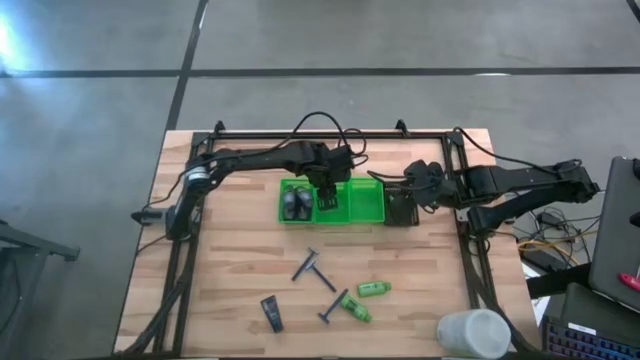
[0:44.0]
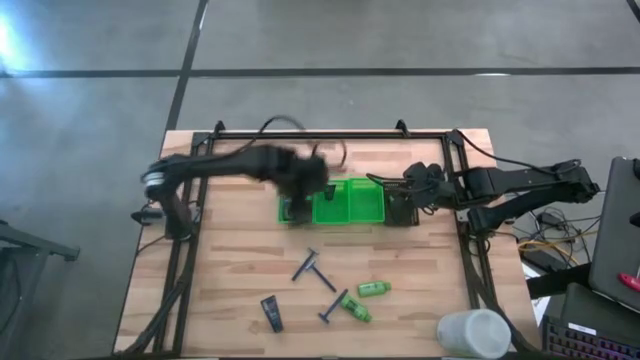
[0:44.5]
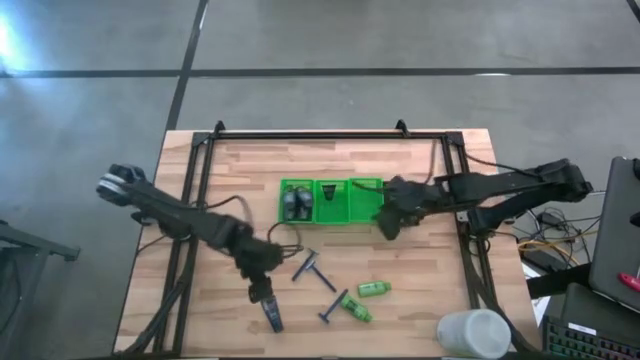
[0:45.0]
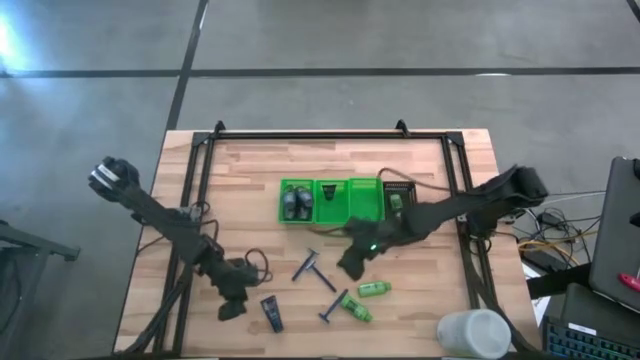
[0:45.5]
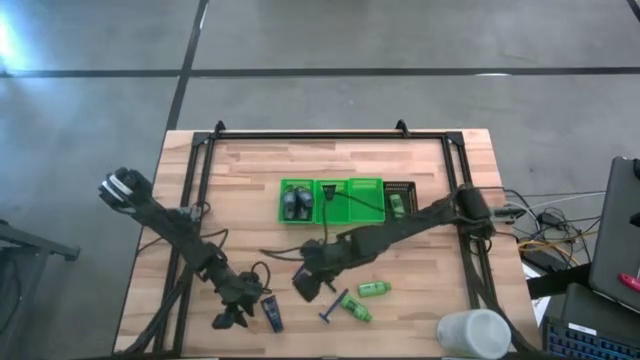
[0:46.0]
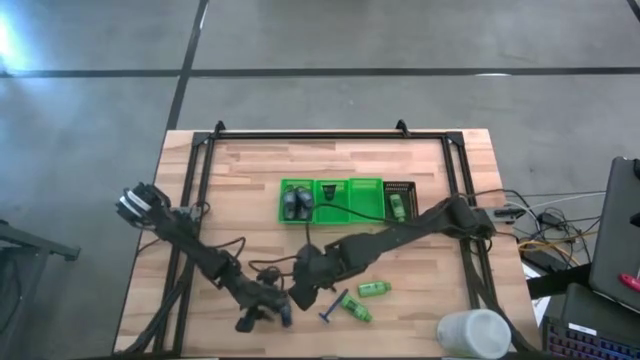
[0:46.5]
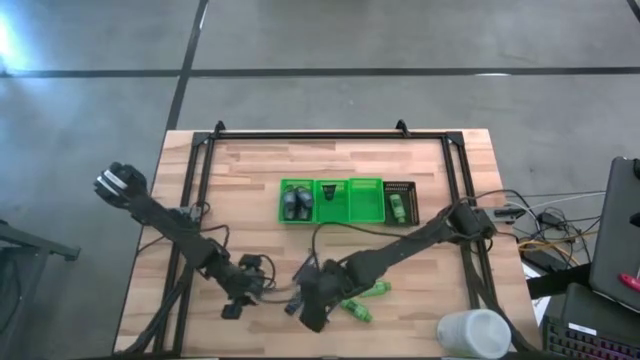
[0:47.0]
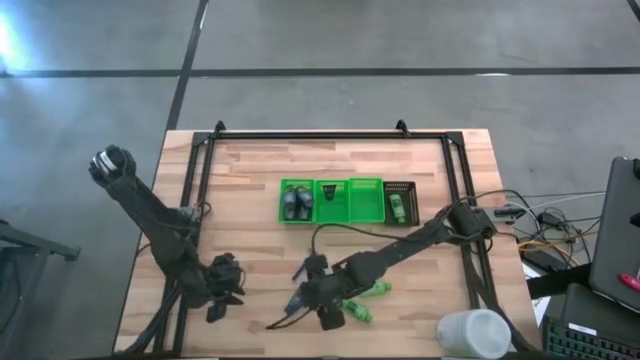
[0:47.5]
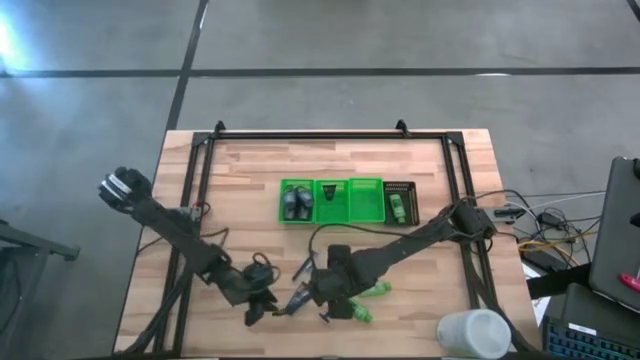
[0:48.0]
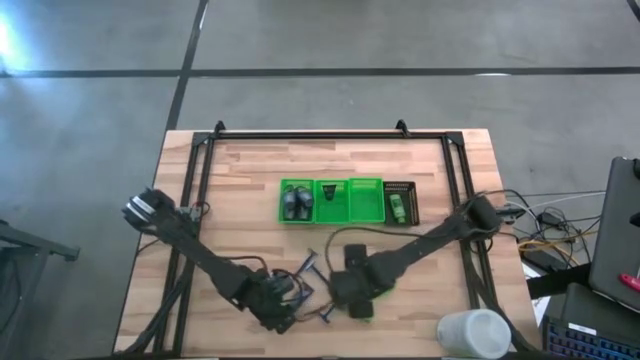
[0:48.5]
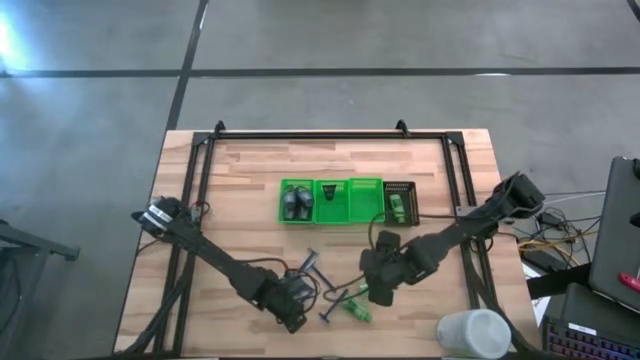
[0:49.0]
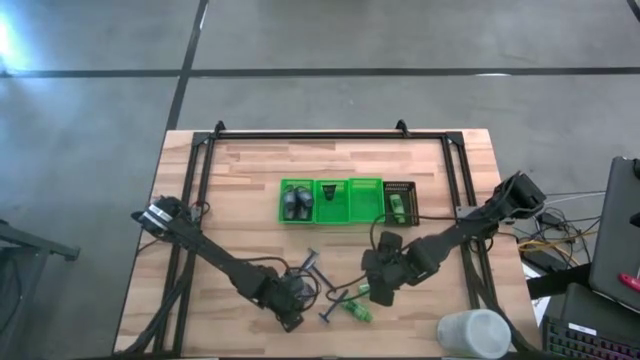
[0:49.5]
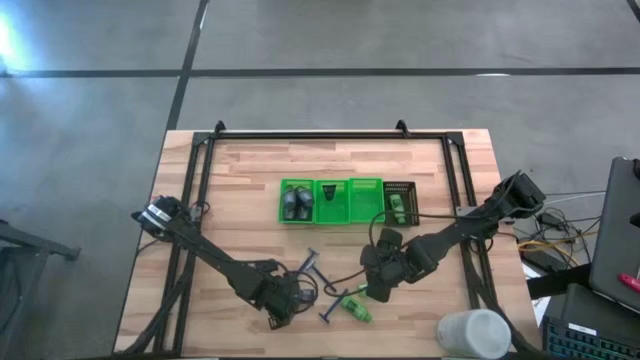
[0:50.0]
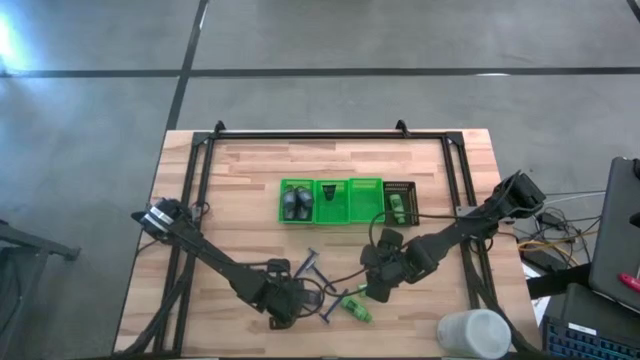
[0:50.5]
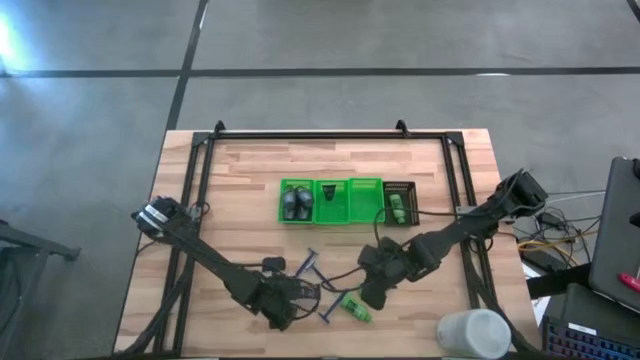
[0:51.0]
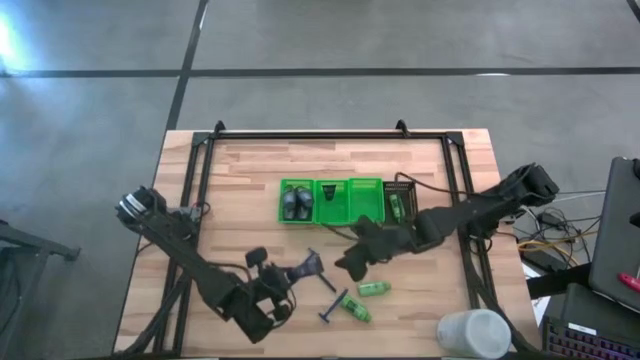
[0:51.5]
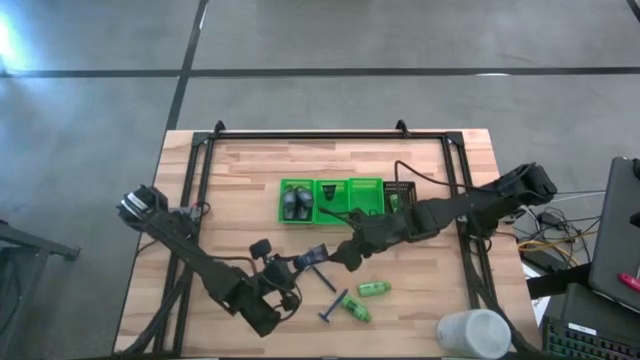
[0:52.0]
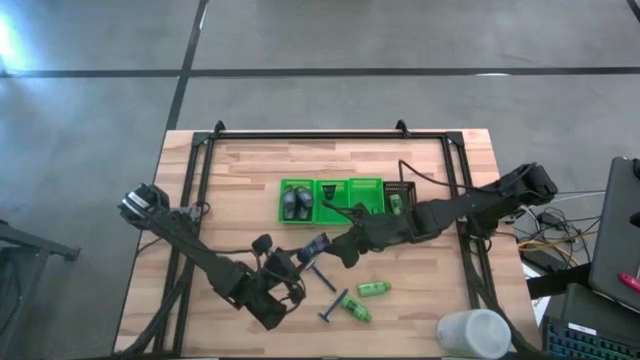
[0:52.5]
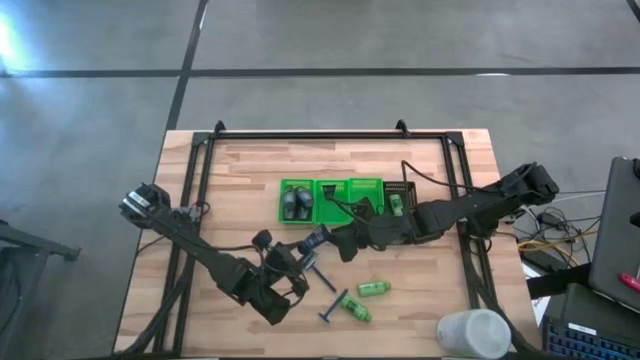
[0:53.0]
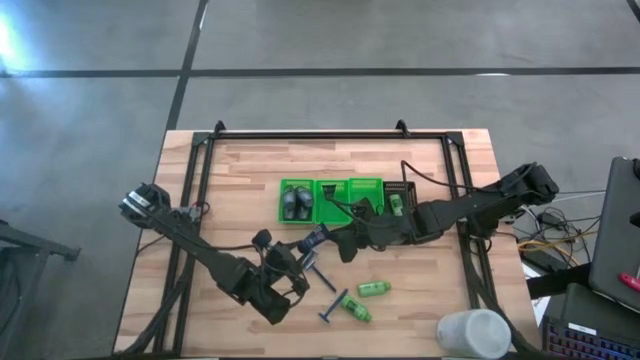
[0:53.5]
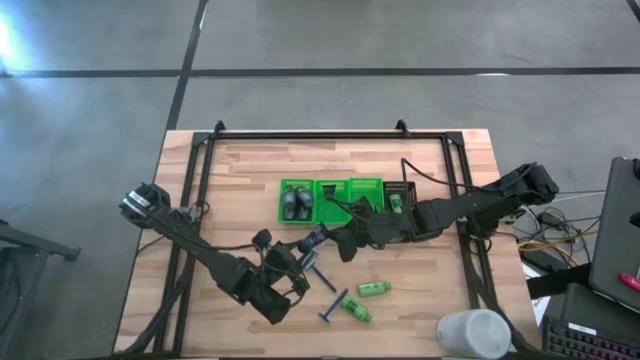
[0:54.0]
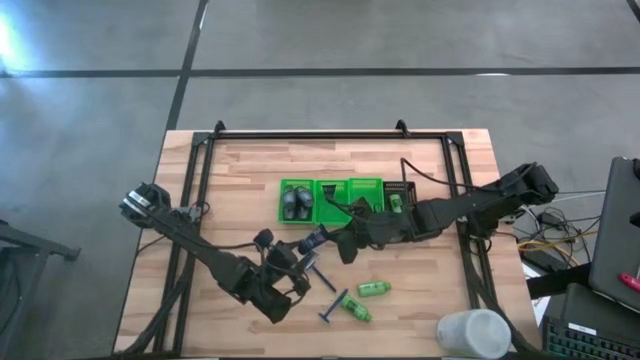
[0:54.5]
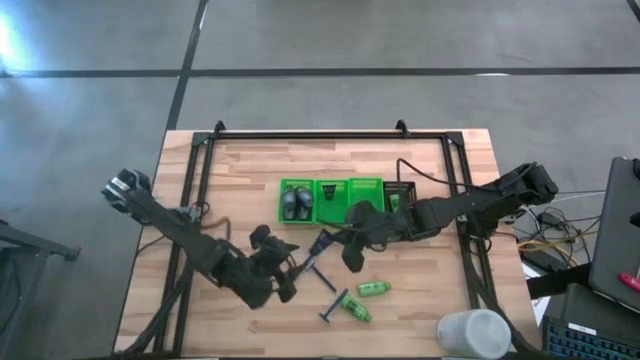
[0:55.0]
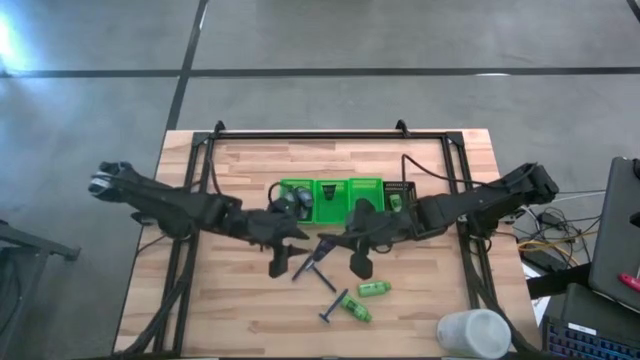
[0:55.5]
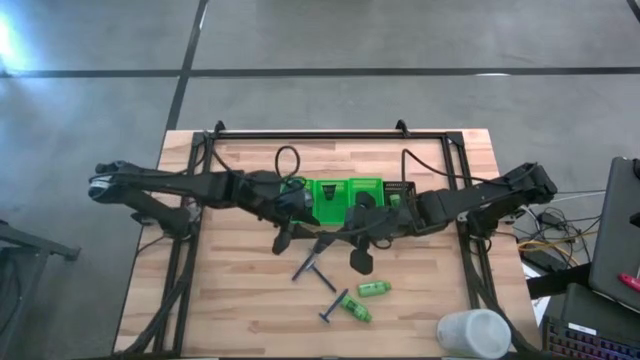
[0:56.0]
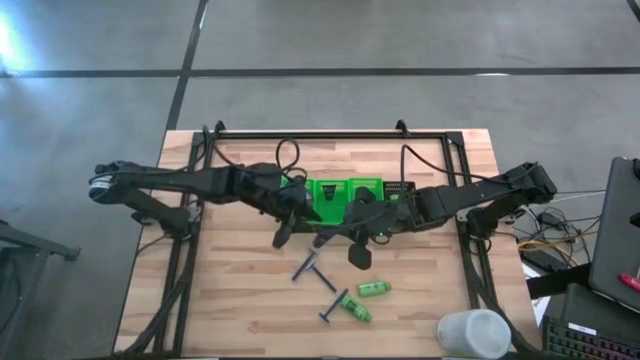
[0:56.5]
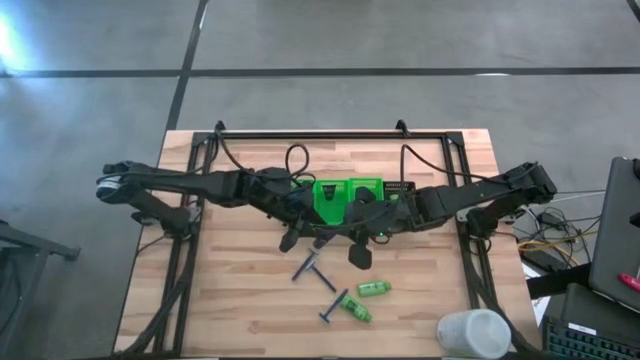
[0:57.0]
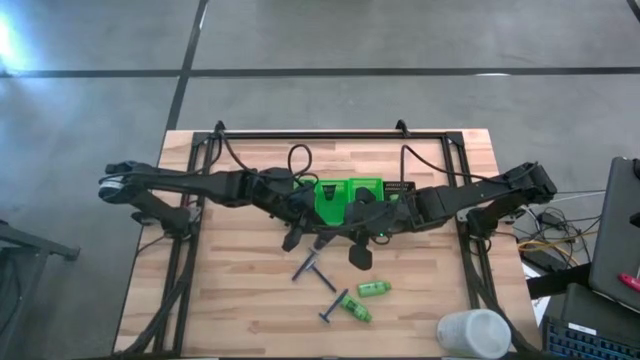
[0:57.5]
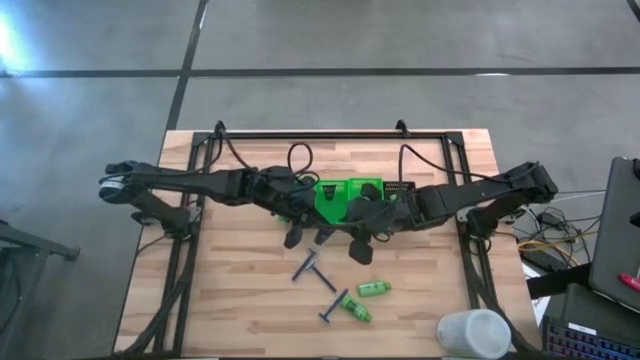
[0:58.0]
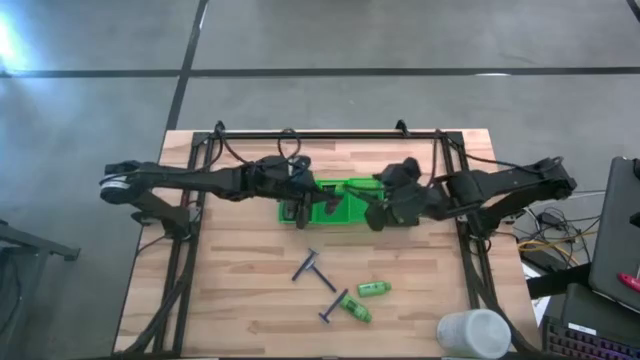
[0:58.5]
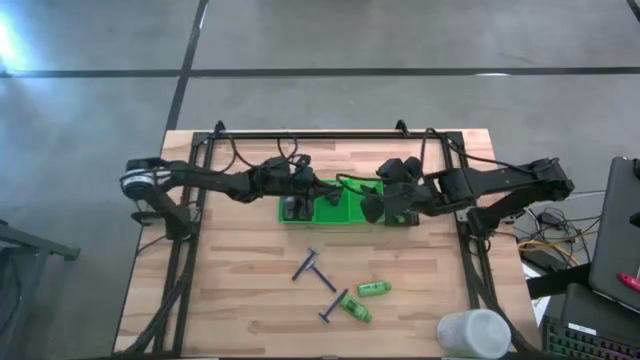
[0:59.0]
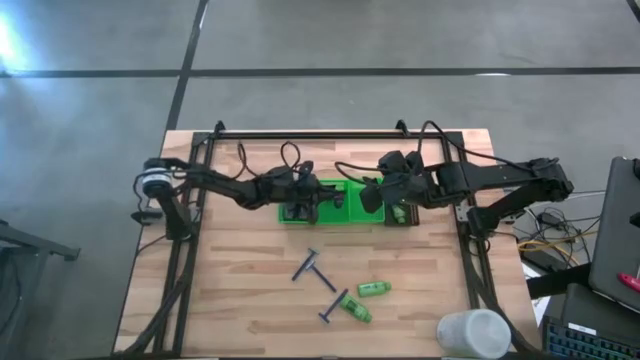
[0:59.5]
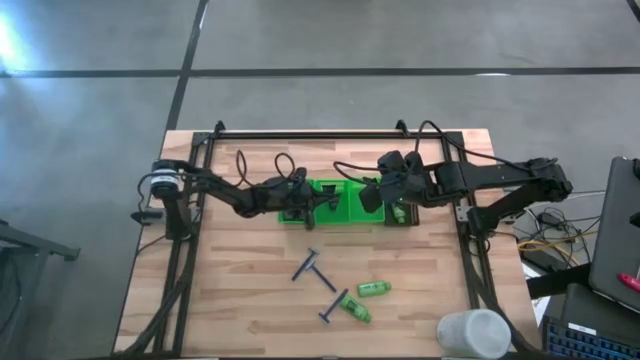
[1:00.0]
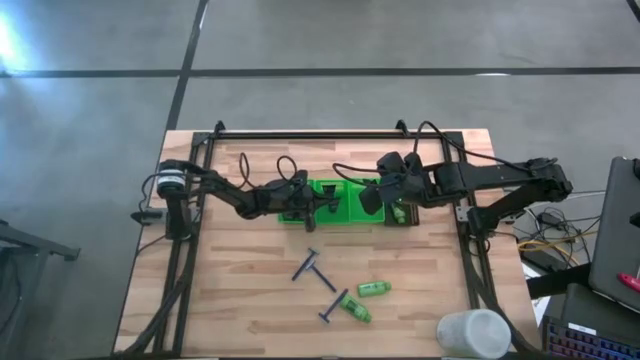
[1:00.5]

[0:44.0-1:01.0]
Task: Pick & Place Travel size toiletries
Put the shaving cream into the middle green bin

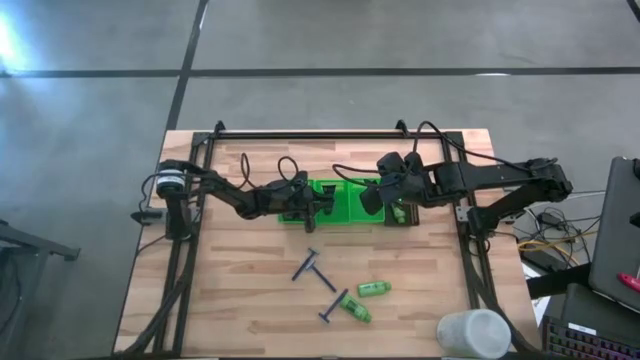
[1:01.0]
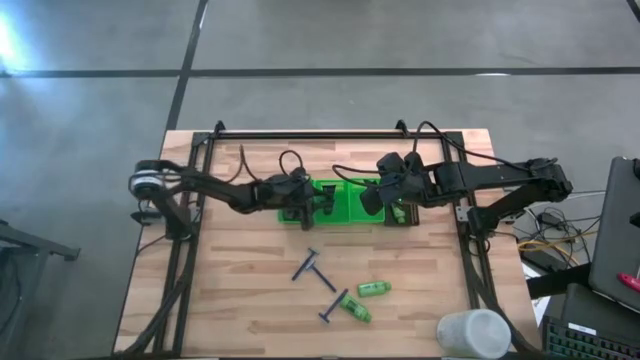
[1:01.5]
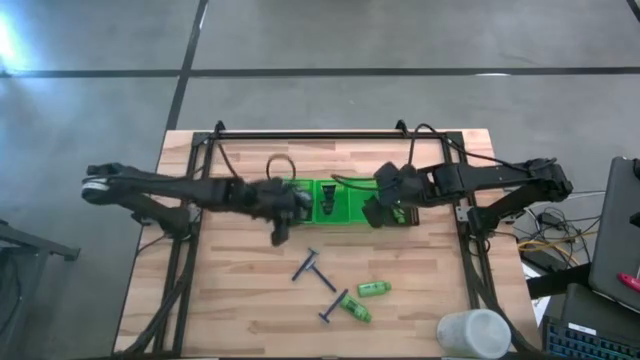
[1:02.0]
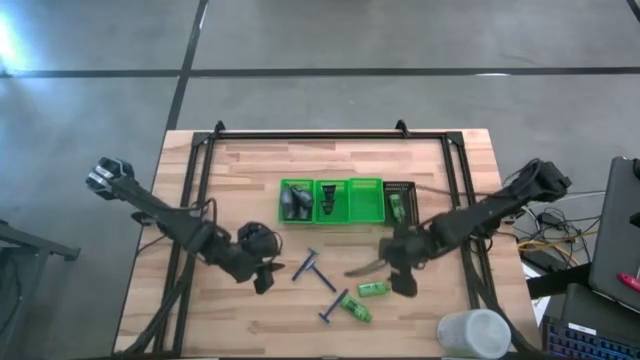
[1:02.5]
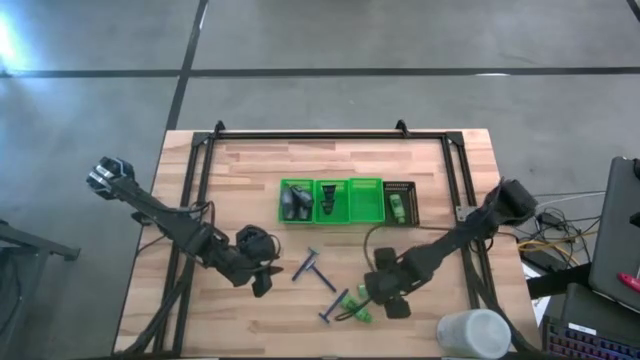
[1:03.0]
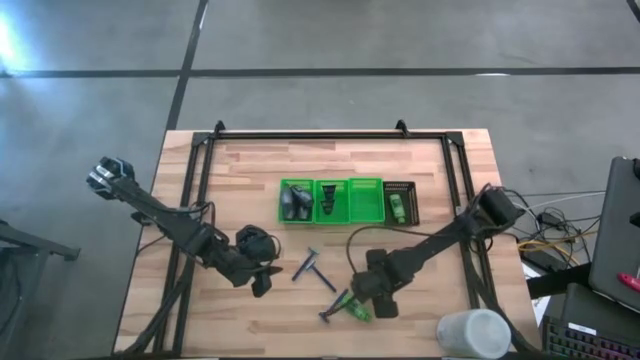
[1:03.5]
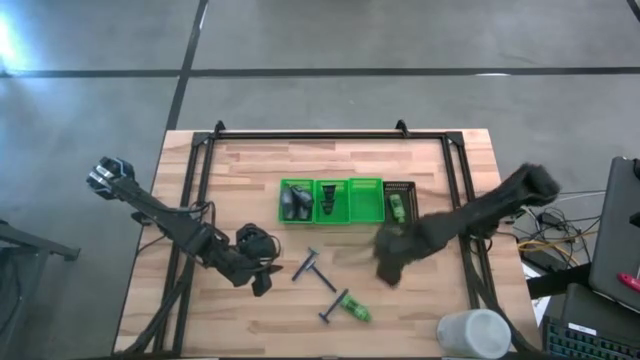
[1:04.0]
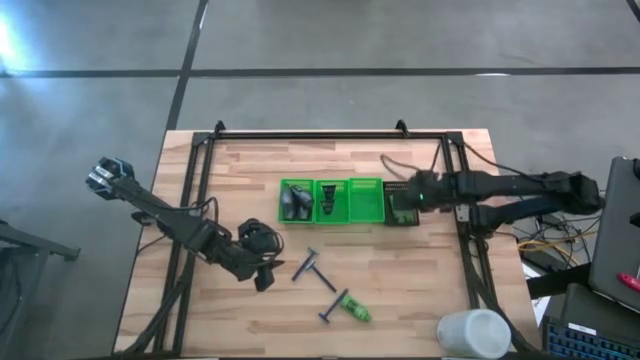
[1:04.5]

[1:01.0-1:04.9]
Put the shampoo into the black bin

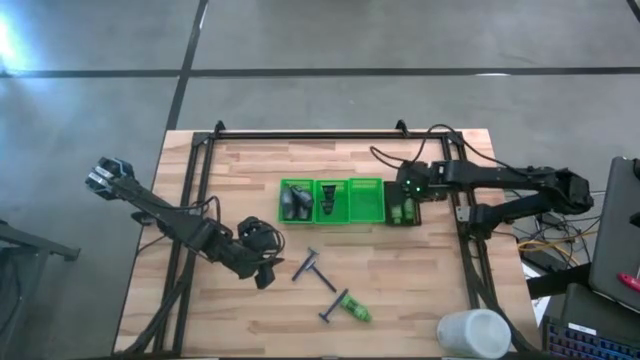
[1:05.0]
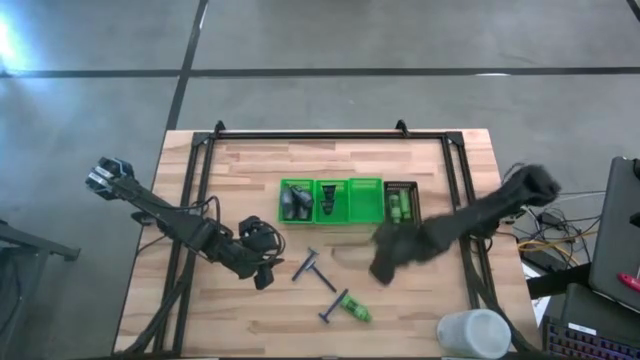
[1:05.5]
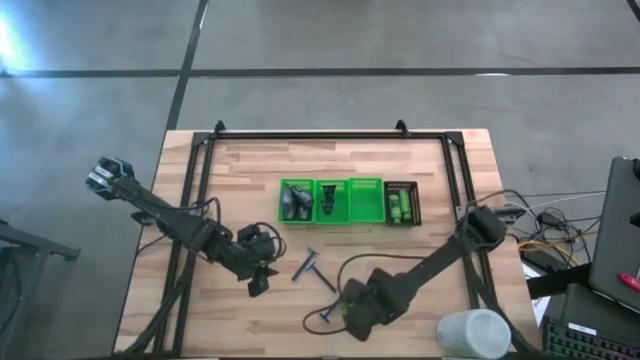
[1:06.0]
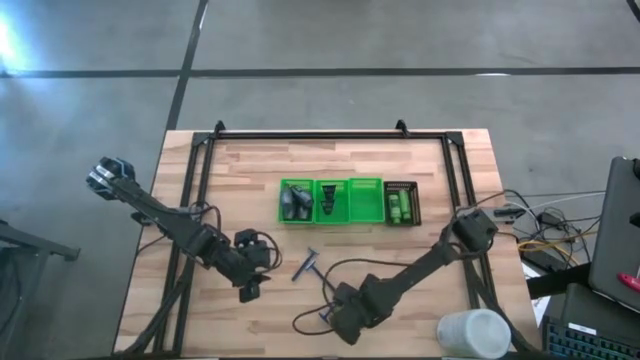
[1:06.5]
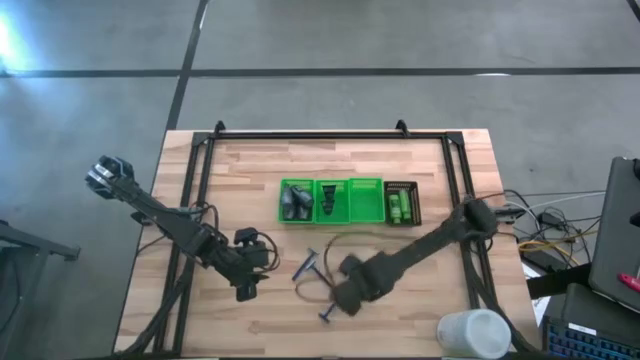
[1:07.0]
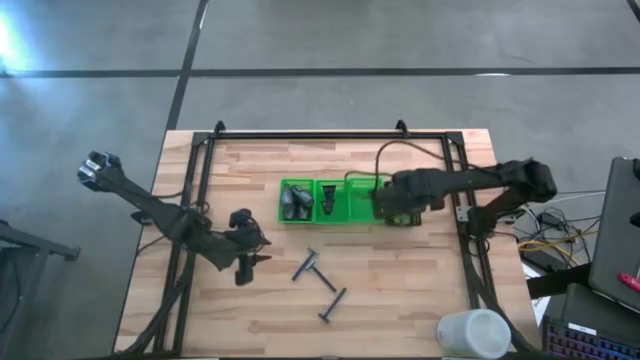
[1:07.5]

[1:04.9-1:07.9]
Put the shampoo into the black bin
